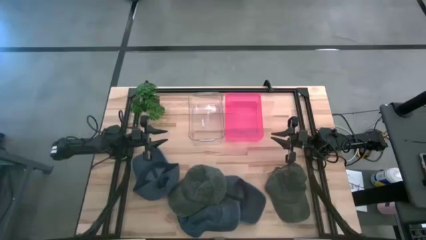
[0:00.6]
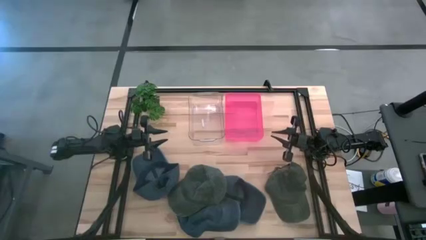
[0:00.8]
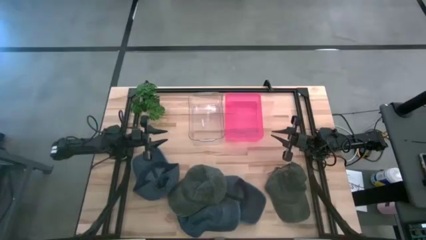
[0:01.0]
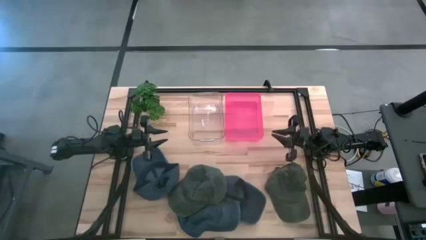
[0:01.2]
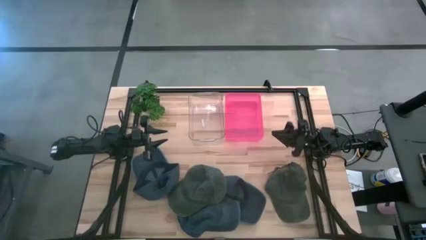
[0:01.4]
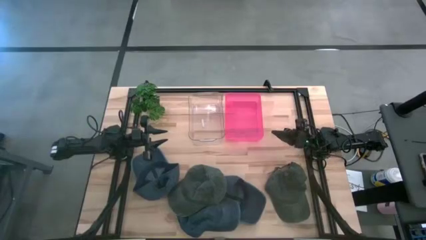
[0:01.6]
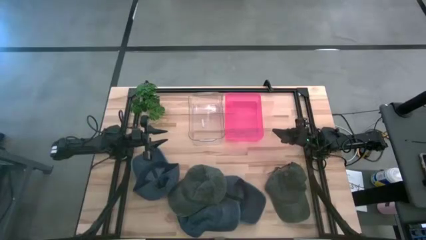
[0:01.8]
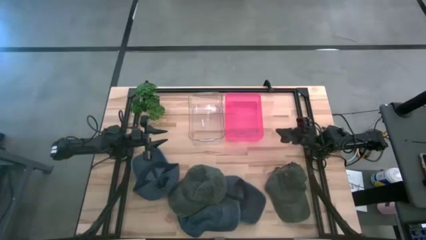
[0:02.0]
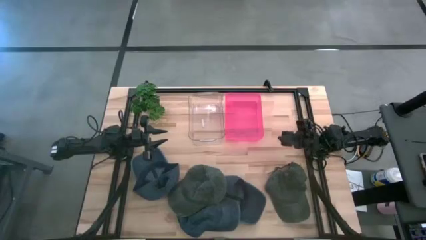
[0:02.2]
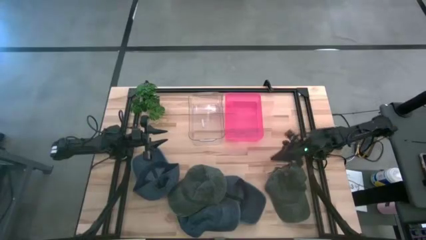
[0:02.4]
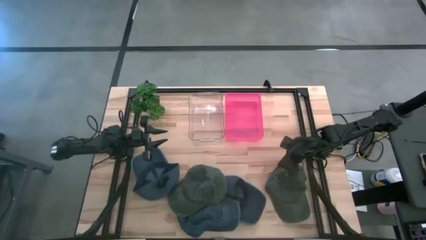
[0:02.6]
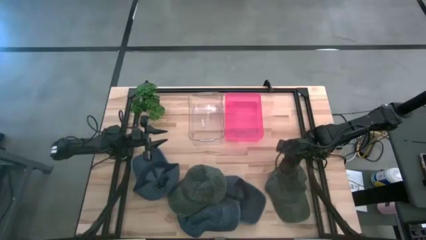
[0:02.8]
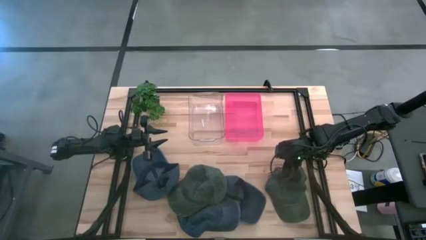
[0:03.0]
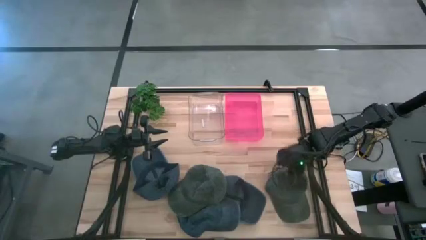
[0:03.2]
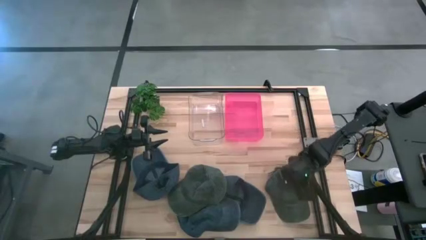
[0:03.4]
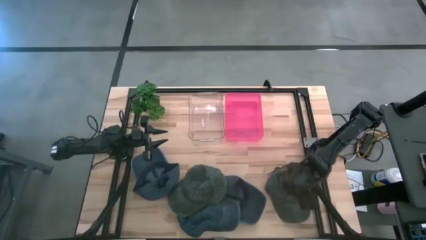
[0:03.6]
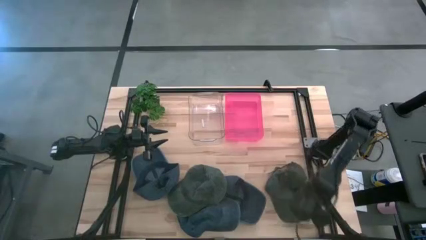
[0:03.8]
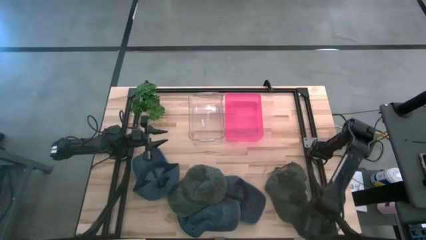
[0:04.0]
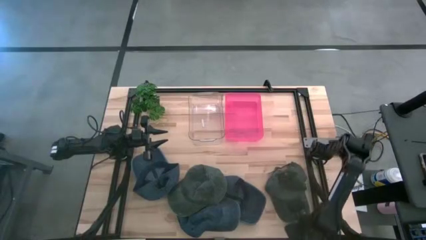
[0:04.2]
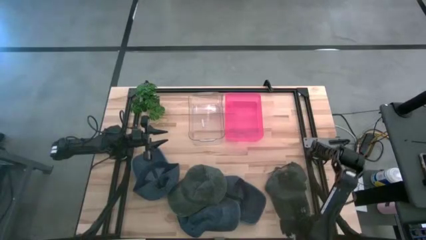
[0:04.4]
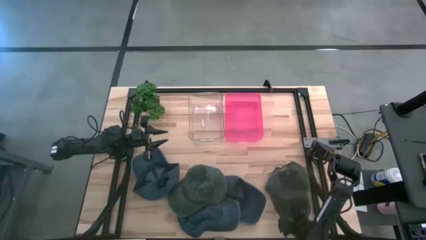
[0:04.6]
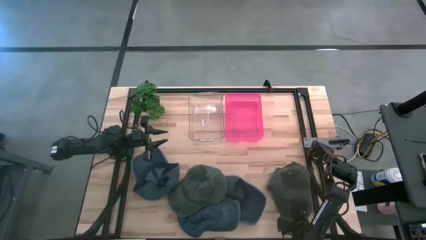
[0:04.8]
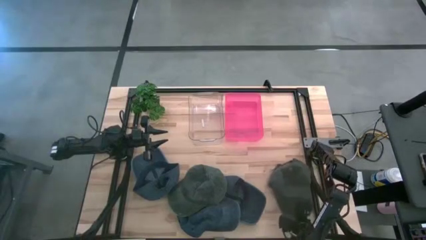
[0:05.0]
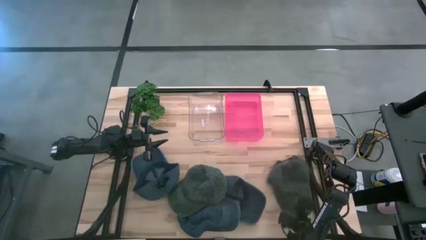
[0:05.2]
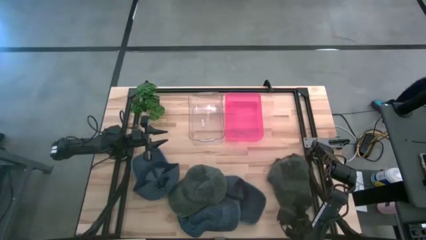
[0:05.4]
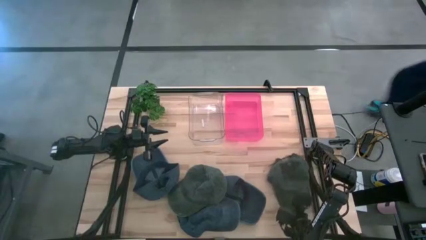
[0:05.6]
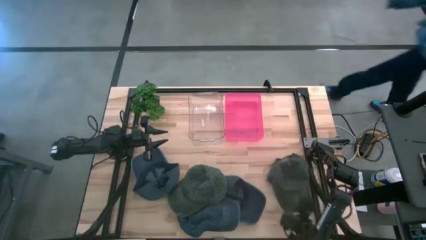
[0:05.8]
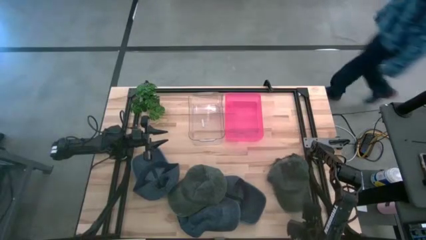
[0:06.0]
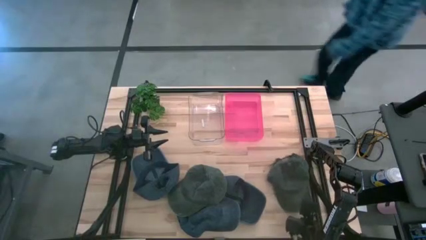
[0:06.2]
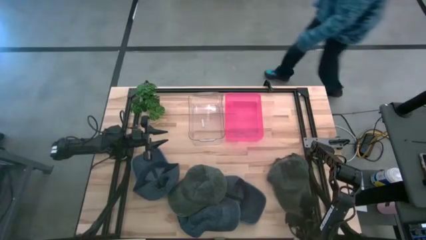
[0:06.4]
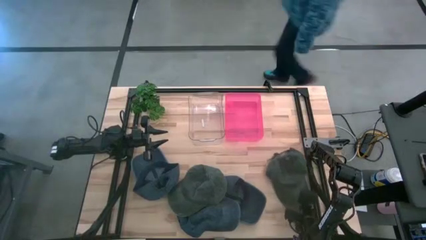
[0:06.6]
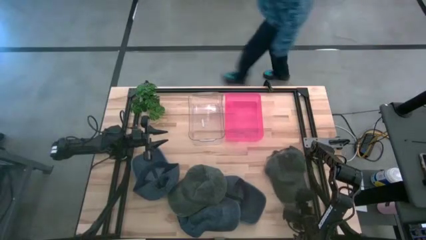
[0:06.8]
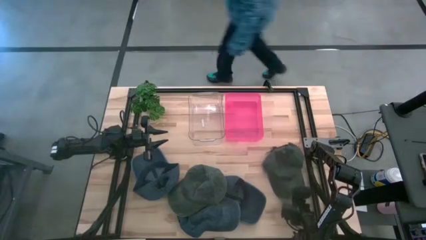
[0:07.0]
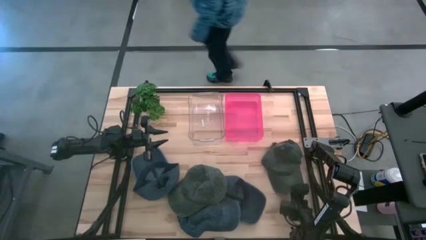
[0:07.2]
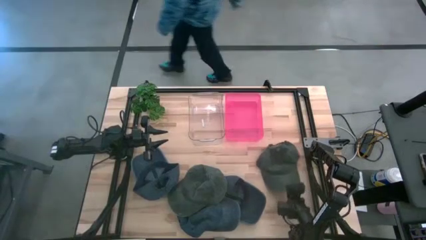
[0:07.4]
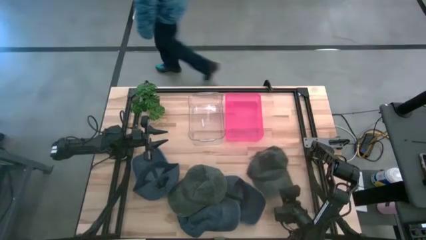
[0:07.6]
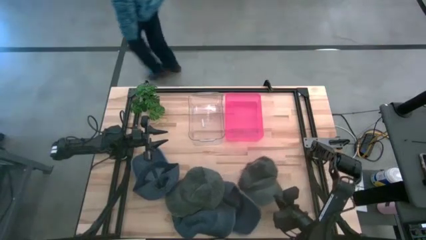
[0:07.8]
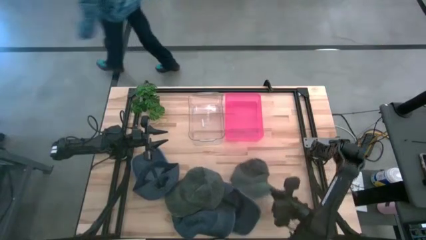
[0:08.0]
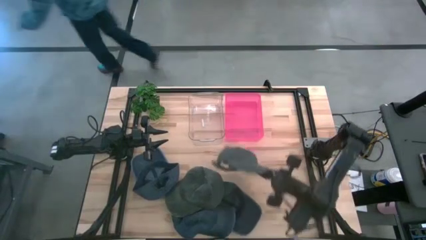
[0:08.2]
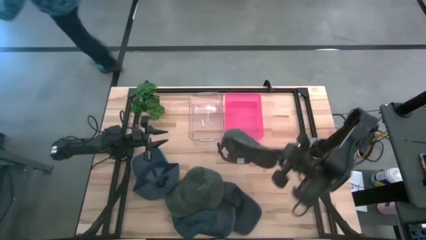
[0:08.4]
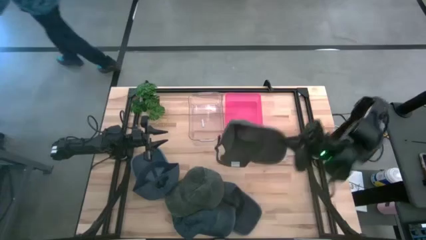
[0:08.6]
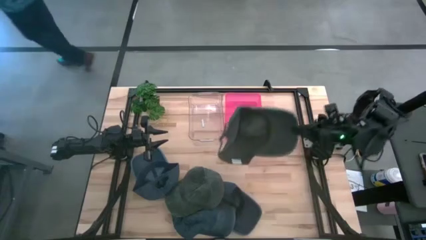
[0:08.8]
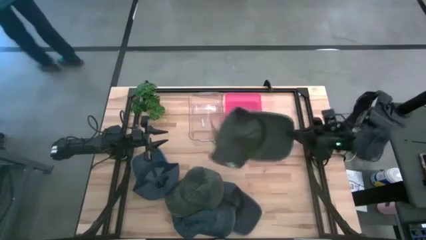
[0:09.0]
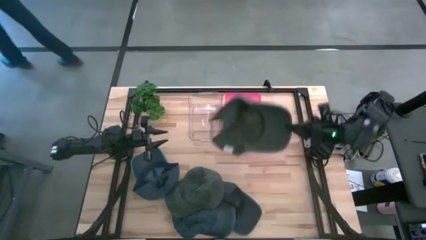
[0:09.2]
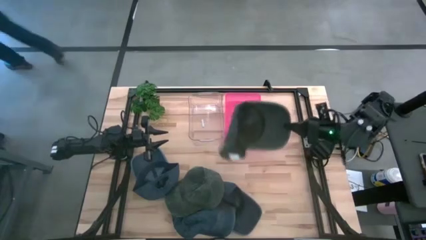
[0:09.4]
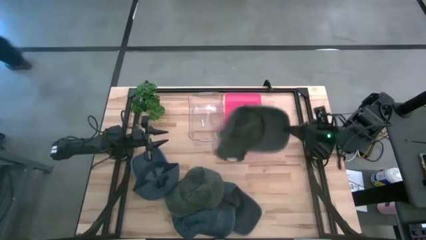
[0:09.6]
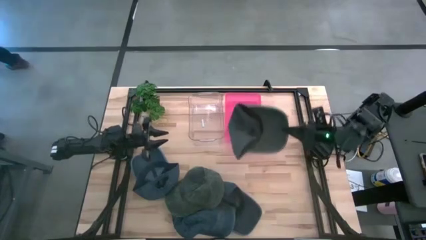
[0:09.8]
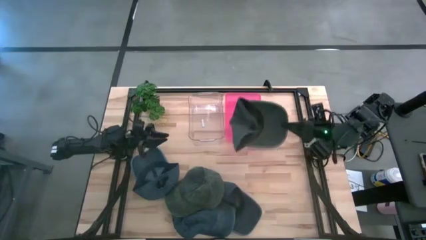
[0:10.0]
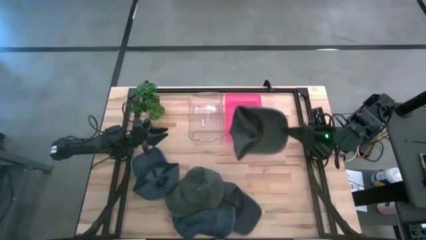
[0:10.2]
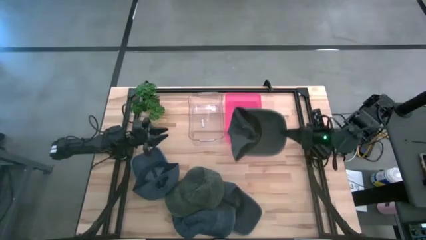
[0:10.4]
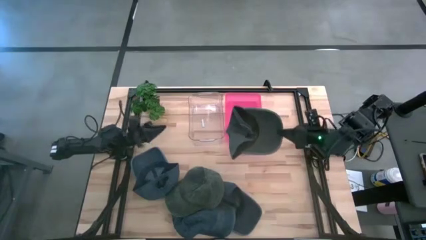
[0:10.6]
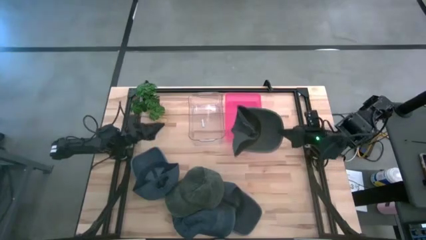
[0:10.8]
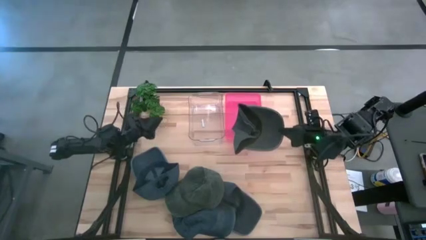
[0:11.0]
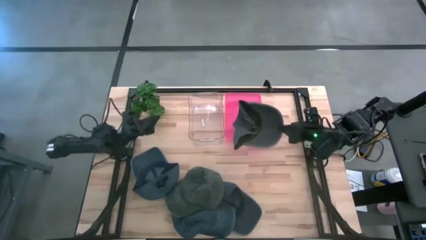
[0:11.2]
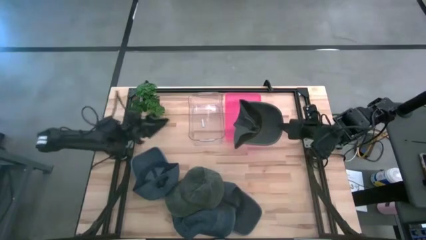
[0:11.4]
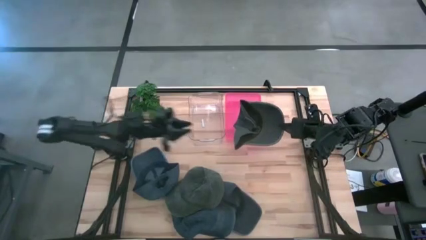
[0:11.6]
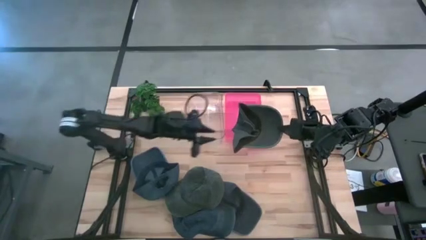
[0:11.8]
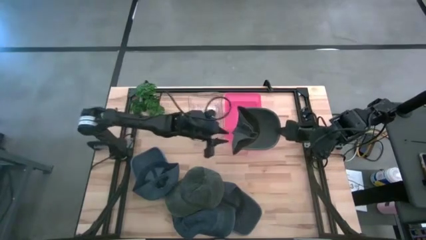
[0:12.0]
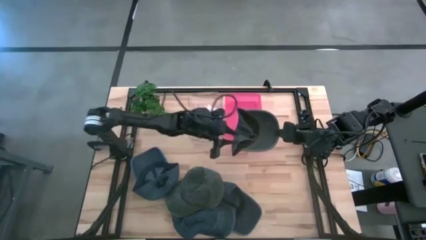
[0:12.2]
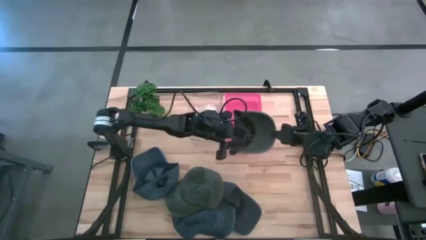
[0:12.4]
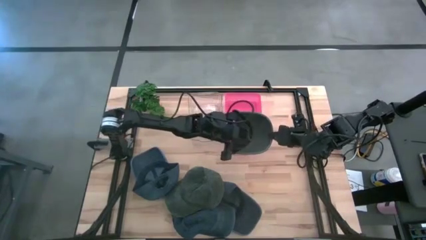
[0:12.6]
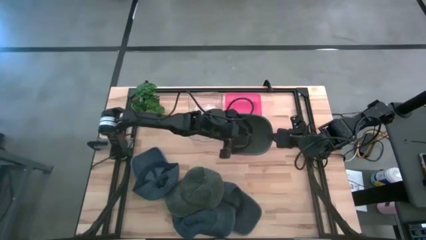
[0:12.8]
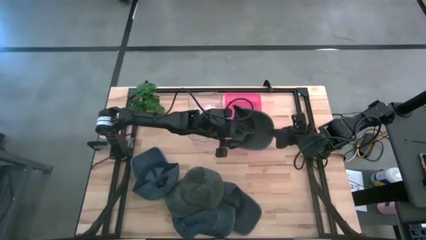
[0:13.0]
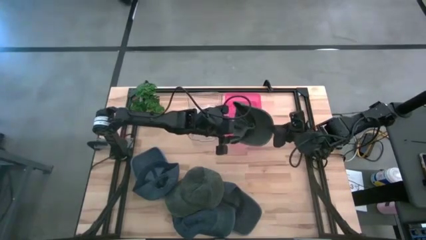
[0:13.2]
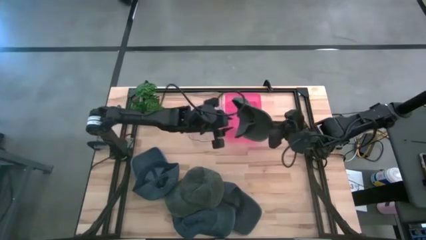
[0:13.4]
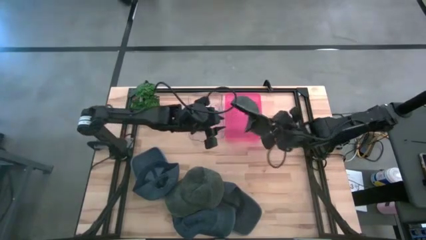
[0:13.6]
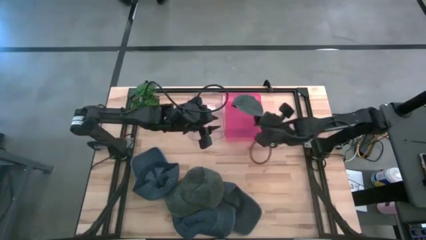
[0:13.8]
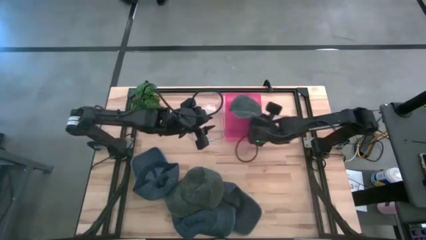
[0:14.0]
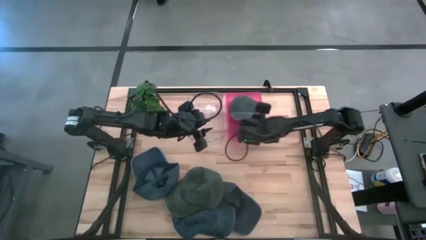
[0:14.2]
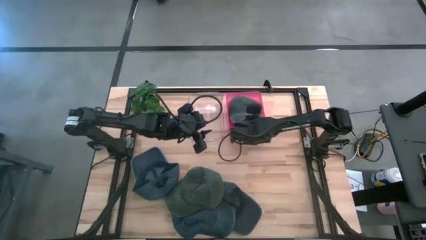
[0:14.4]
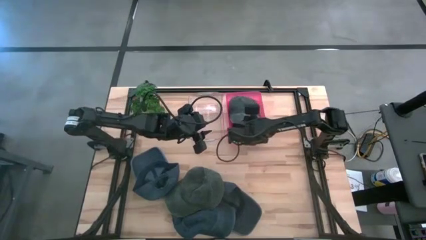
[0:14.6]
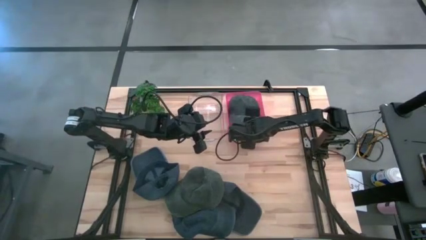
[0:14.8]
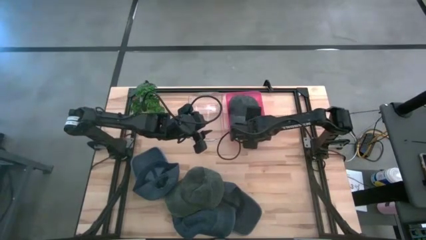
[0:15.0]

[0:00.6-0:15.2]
Task: Pick & Place hat
Put the right green cap into the red bin
